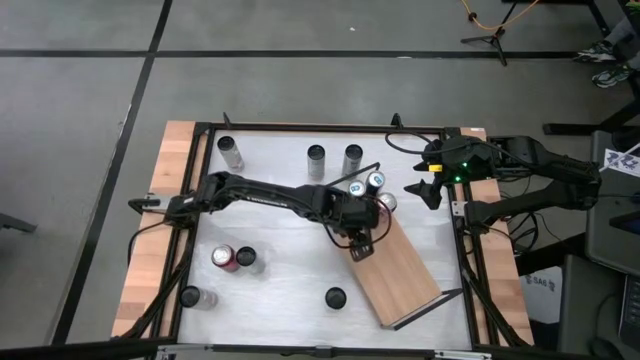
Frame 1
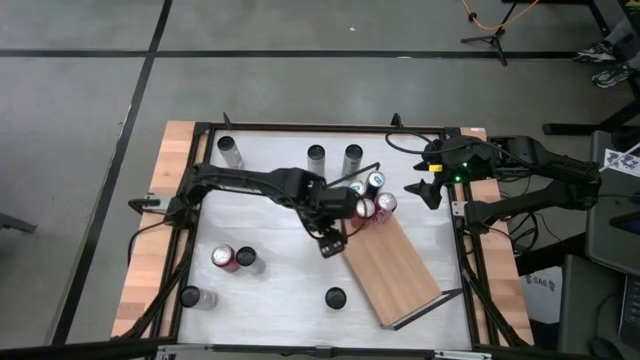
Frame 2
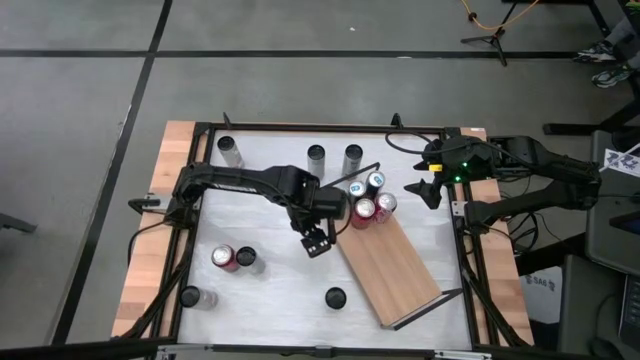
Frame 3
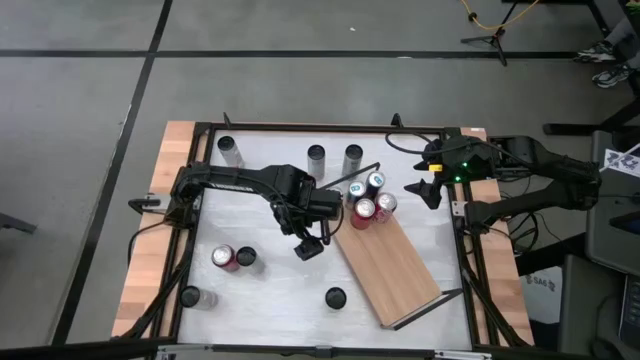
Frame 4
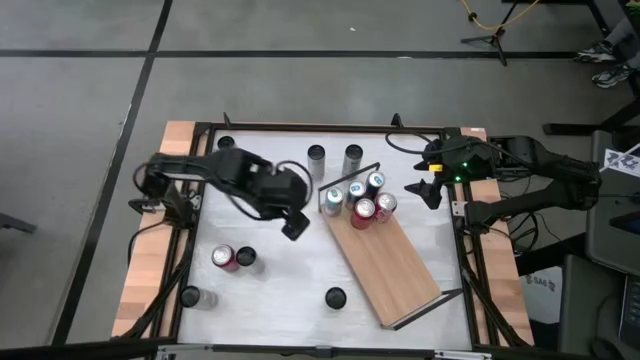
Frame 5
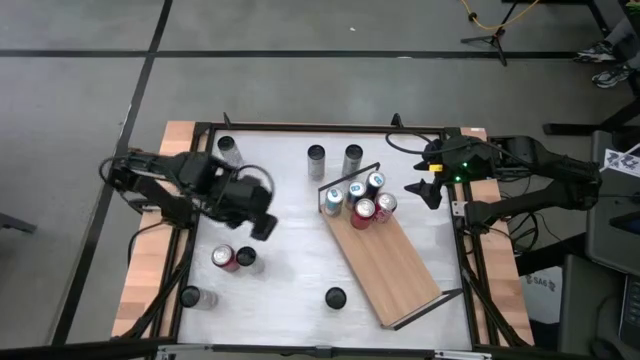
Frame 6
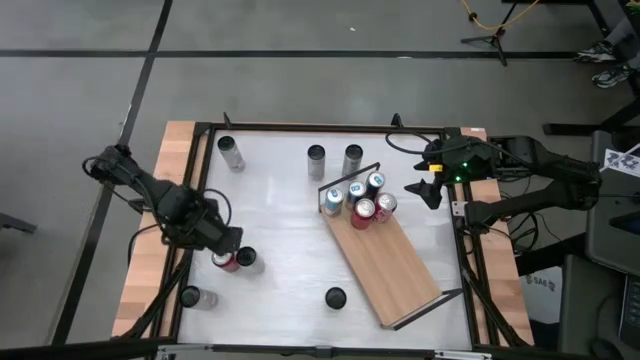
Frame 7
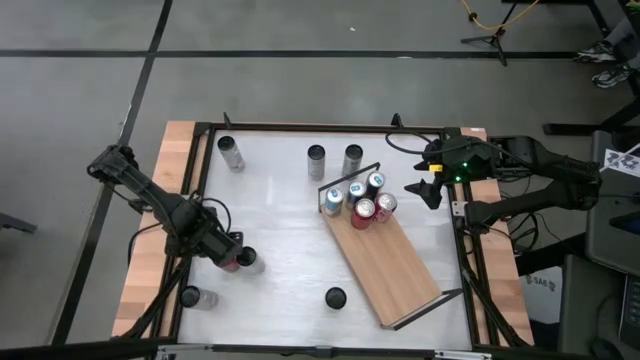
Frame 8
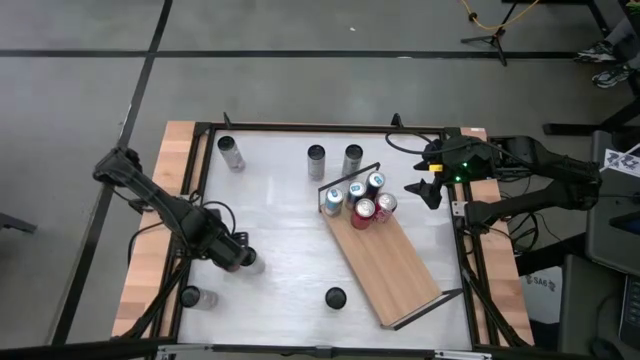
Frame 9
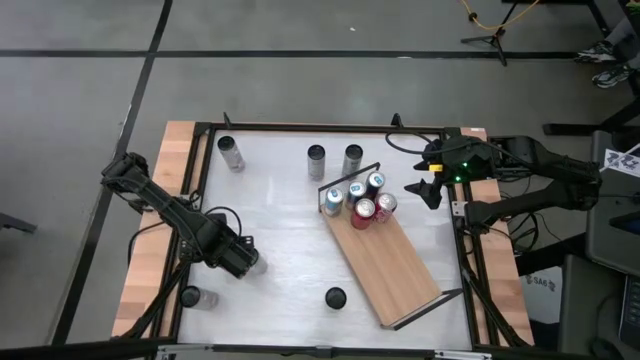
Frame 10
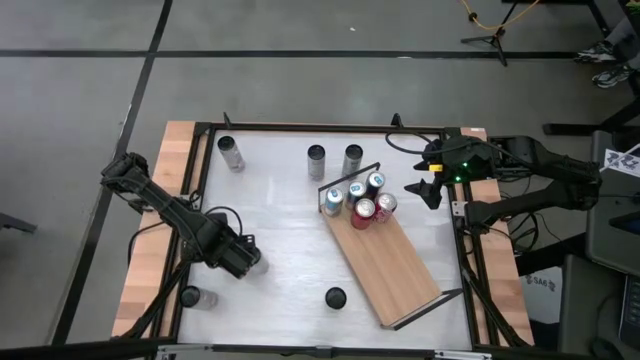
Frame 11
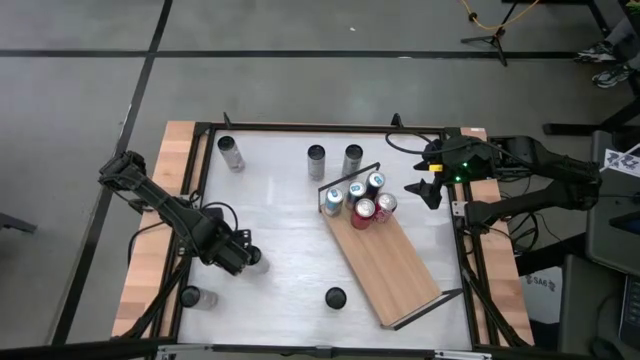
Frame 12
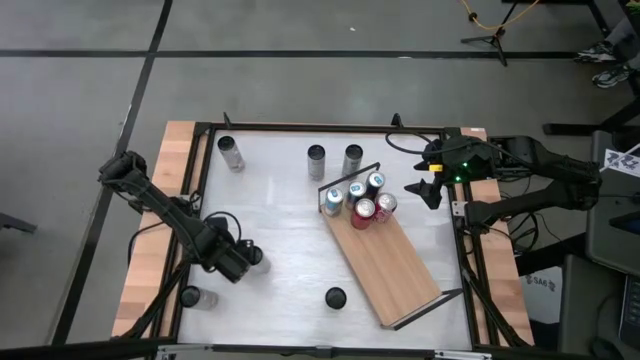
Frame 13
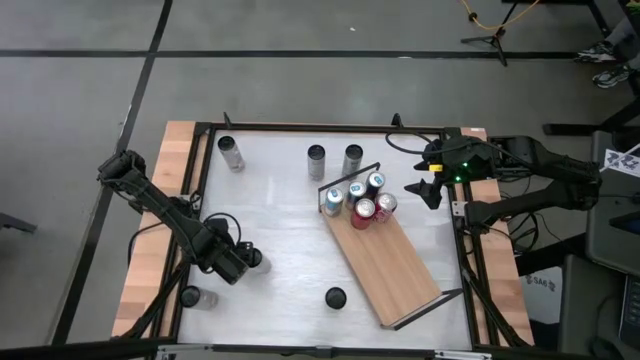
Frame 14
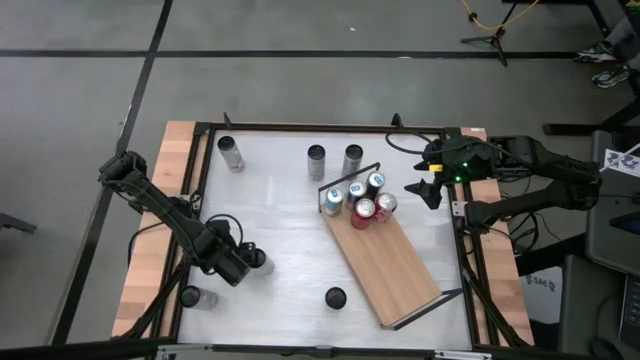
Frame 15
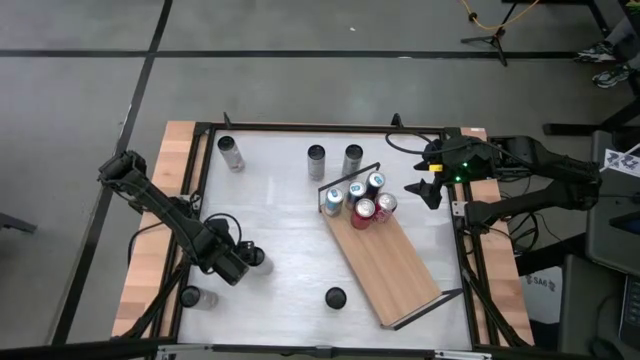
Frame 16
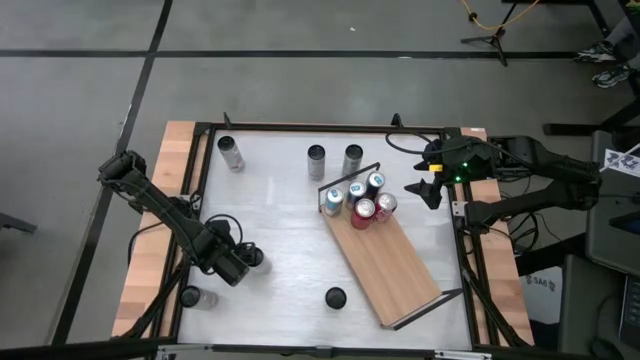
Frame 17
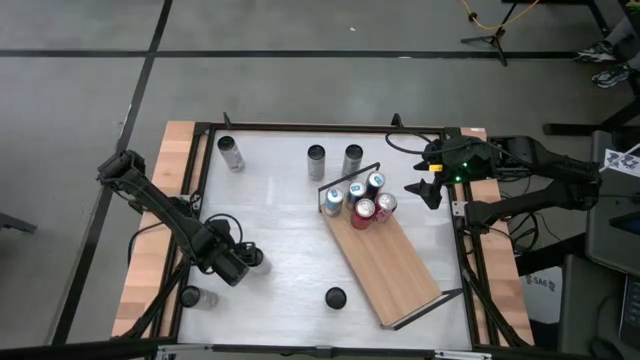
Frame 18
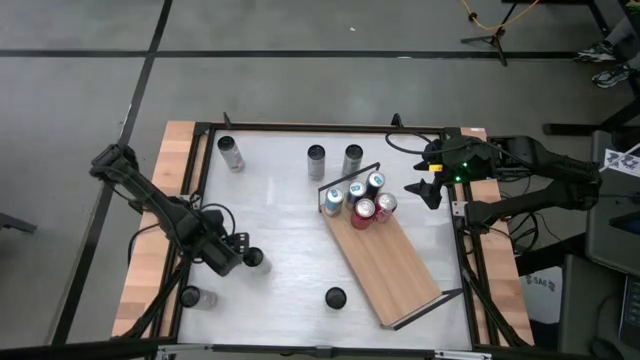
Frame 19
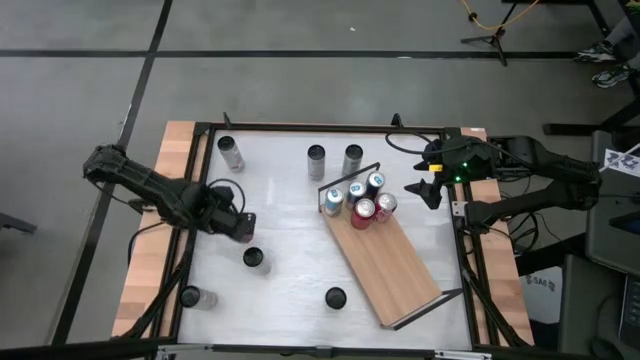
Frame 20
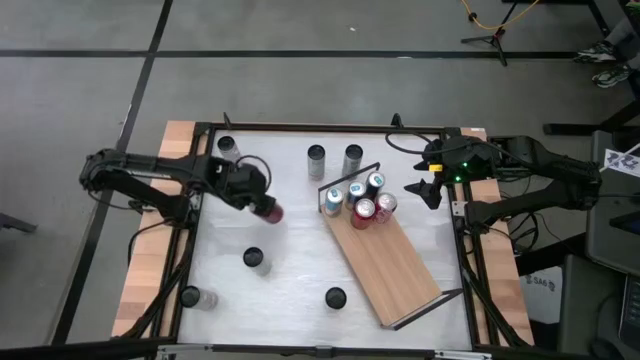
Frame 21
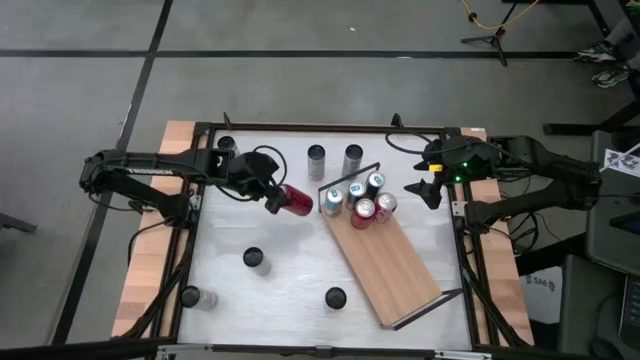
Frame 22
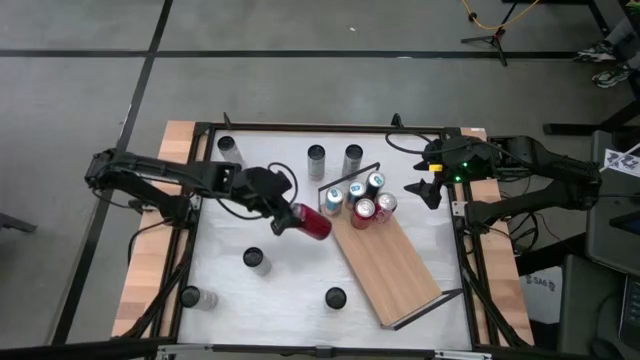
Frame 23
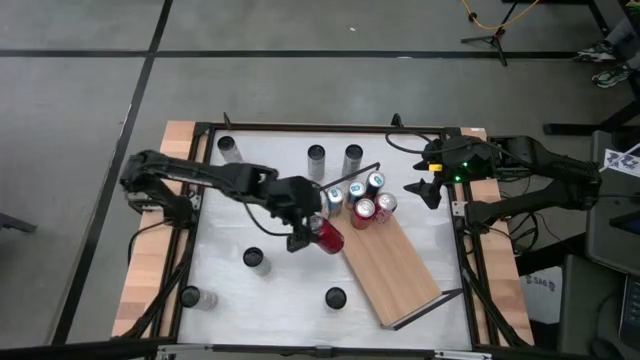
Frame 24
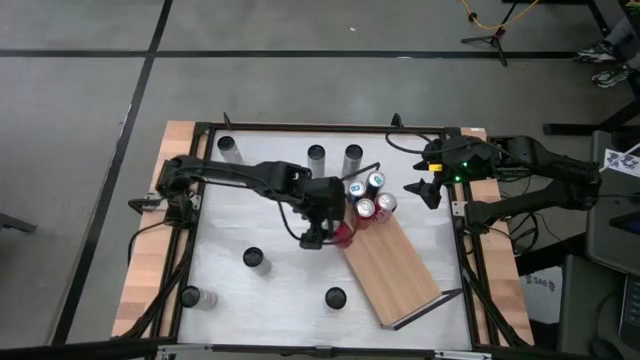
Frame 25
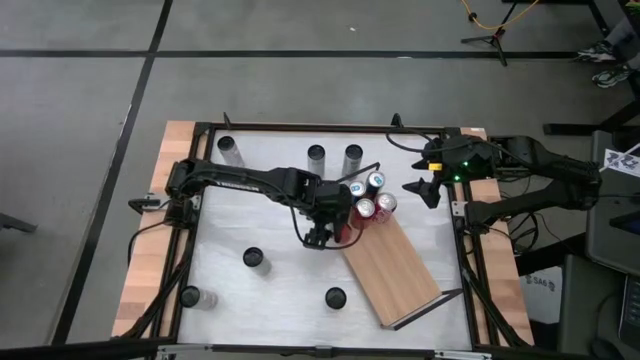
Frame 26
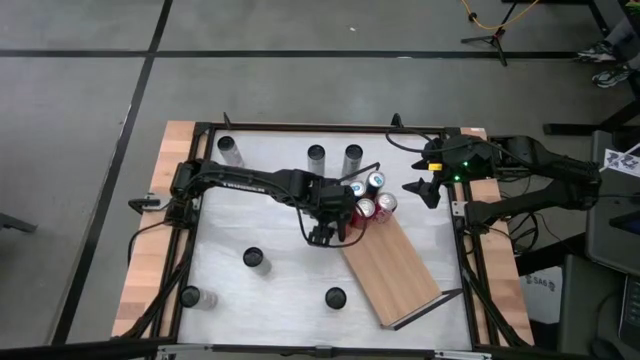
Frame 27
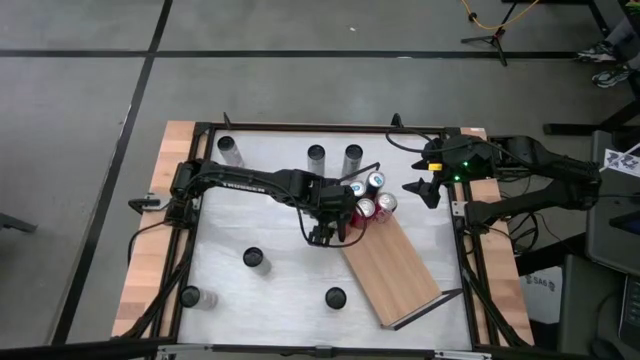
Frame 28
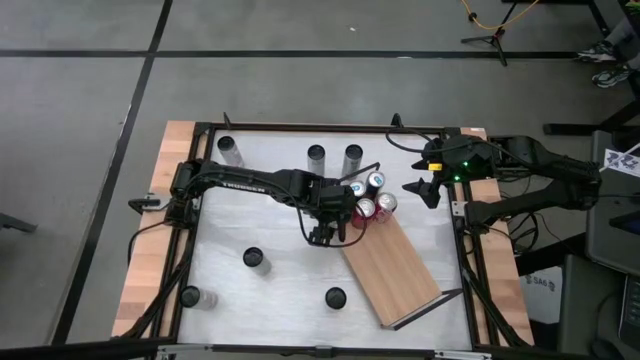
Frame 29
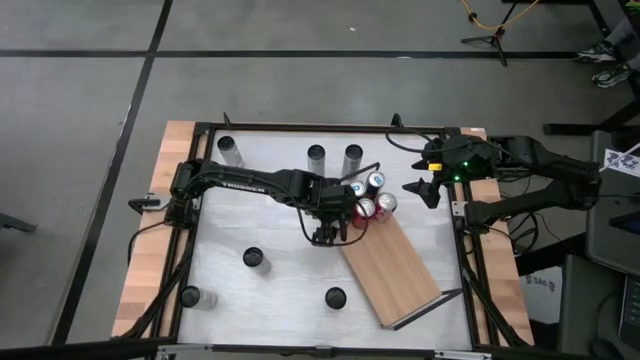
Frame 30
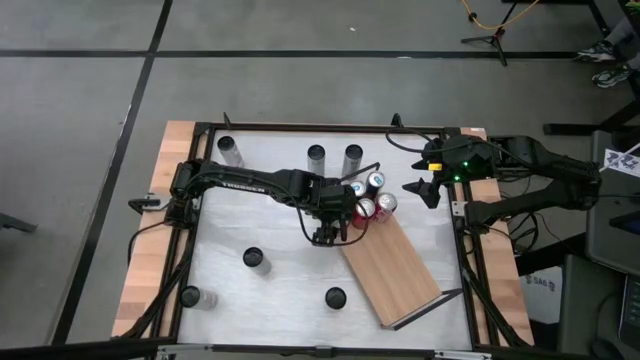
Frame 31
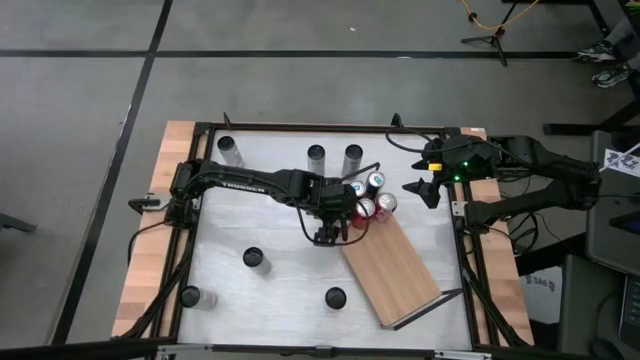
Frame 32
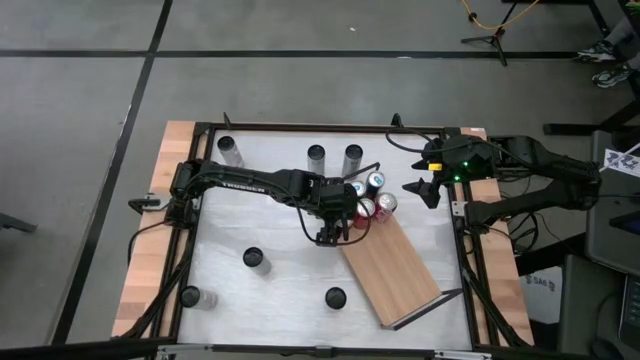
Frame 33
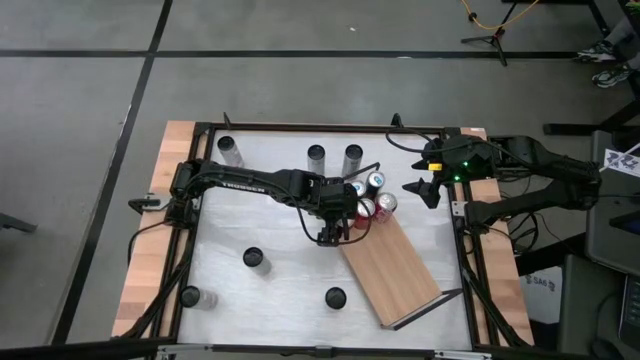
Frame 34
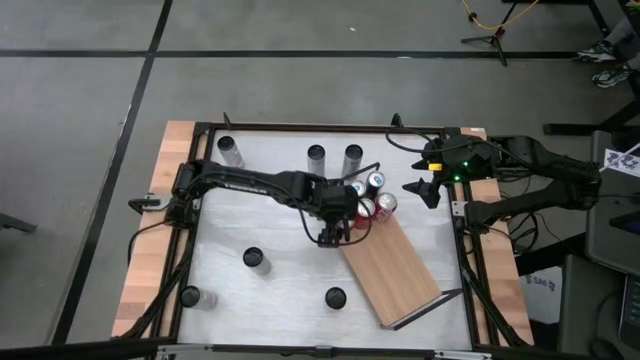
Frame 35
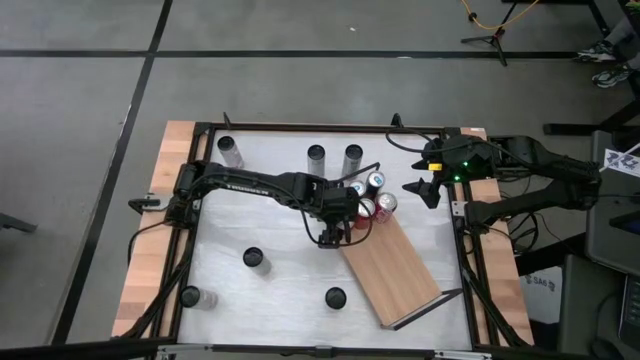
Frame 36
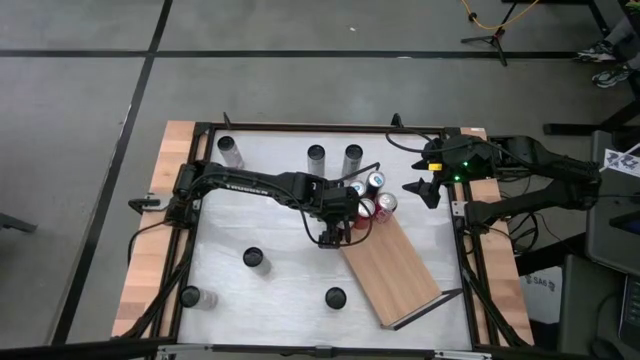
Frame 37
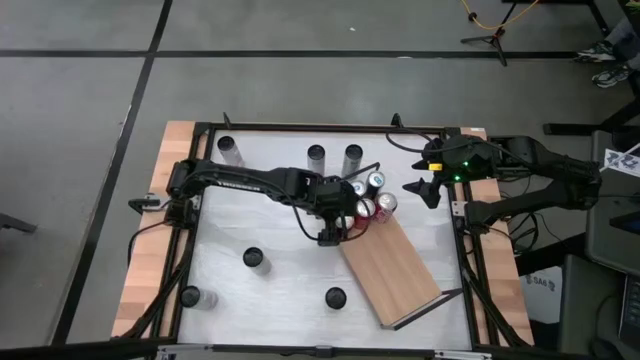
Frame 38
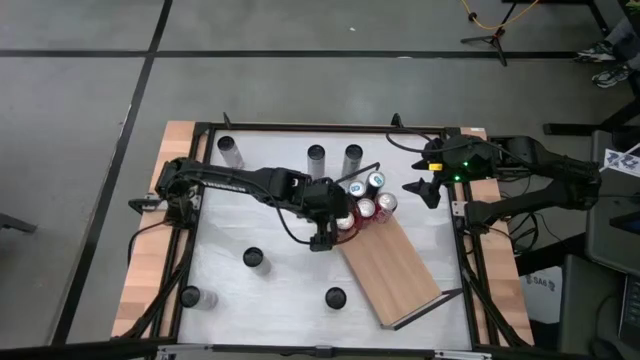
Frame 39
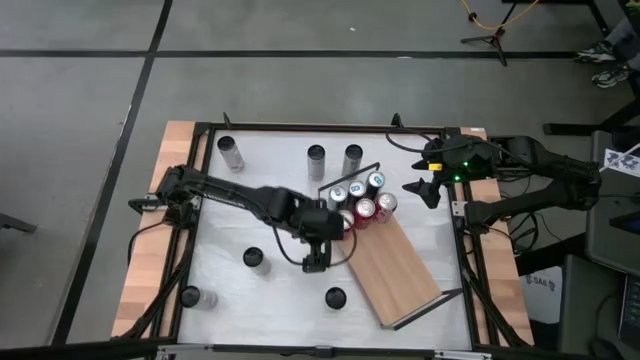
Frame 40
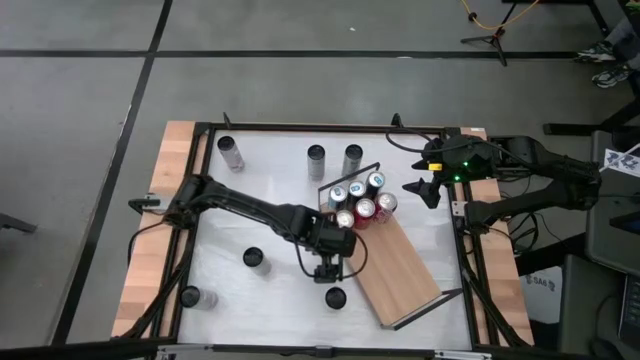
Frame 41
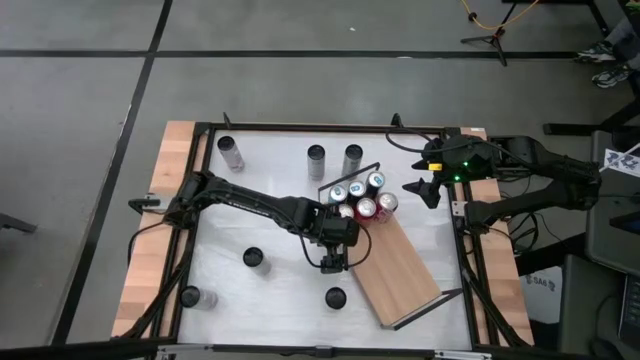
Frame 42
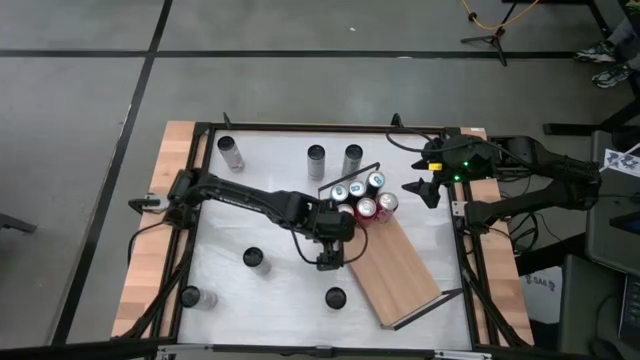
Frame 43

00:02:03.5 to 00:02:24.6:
Task: Place canned beverage on shelf
Put the red soda can on the shelf aligned with the other red soda cans
